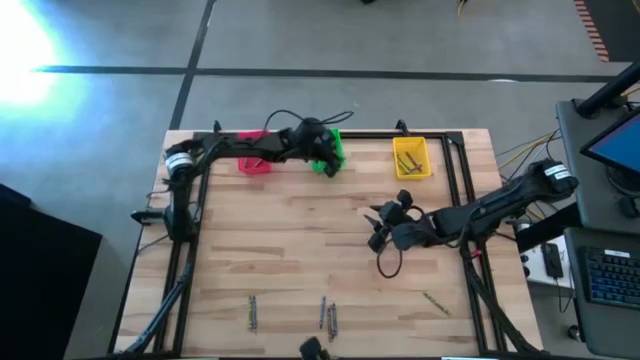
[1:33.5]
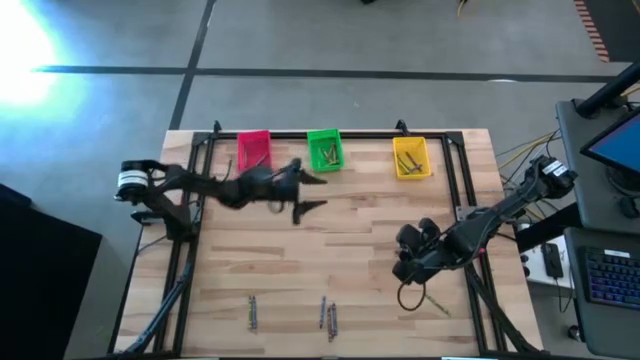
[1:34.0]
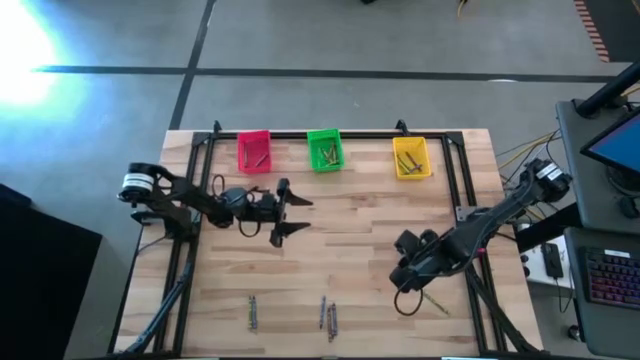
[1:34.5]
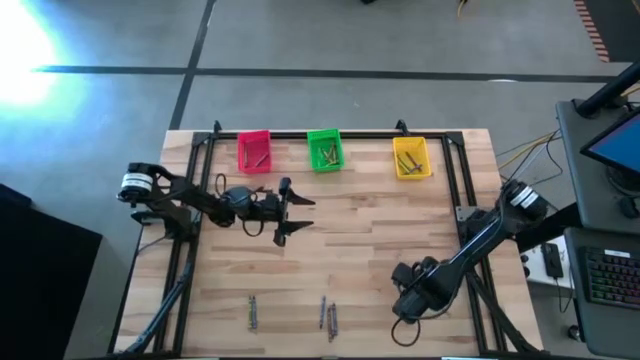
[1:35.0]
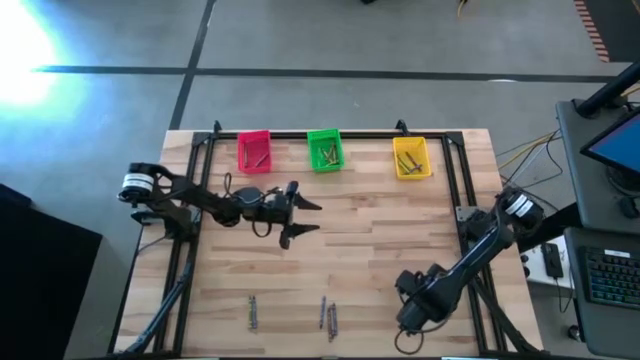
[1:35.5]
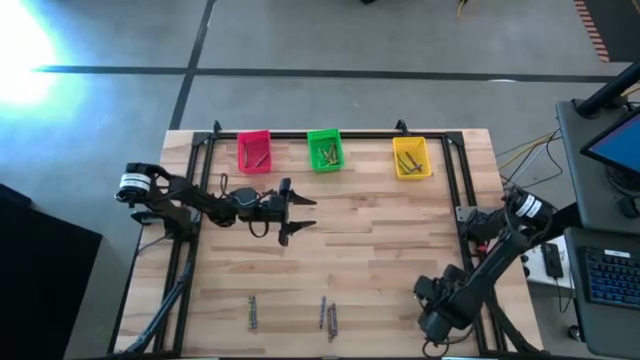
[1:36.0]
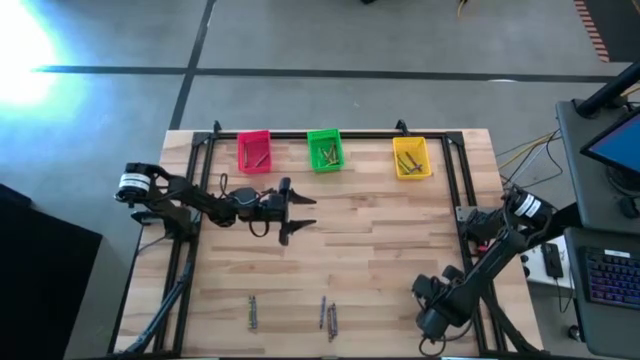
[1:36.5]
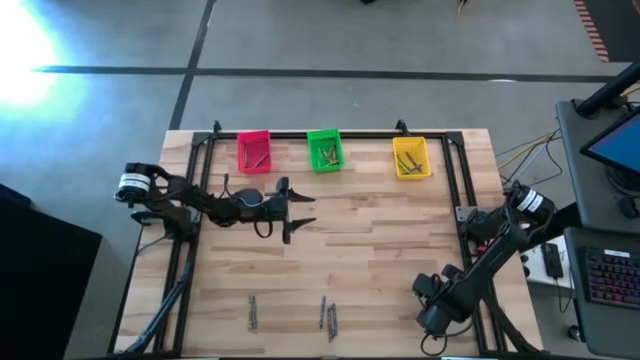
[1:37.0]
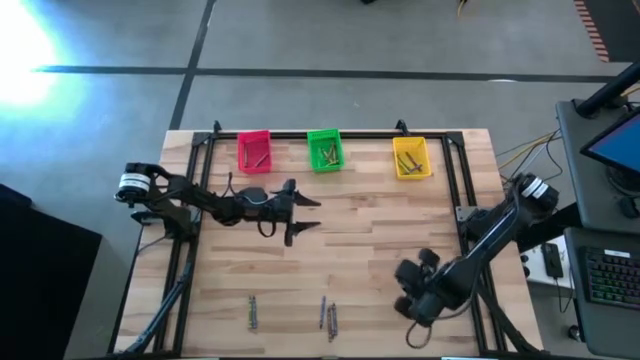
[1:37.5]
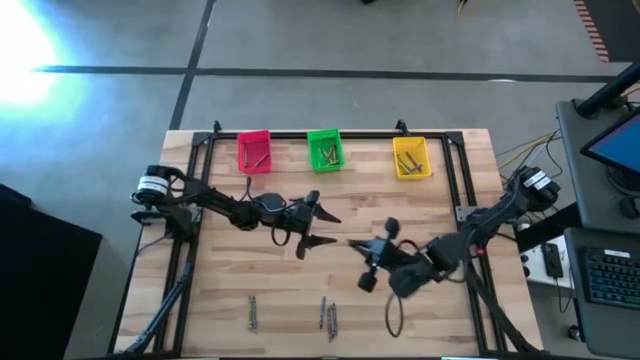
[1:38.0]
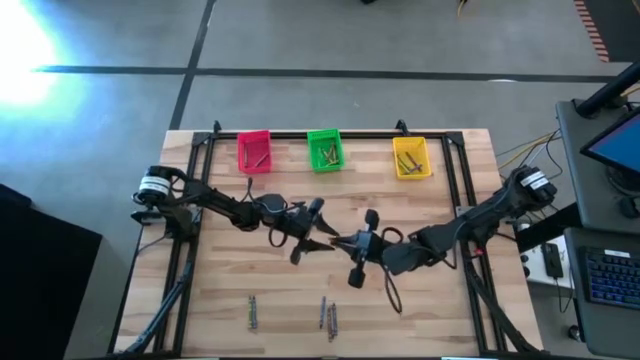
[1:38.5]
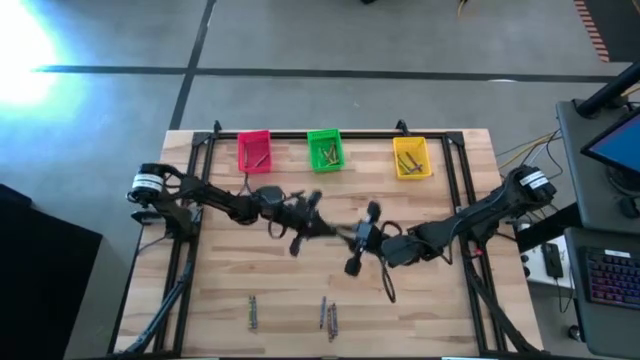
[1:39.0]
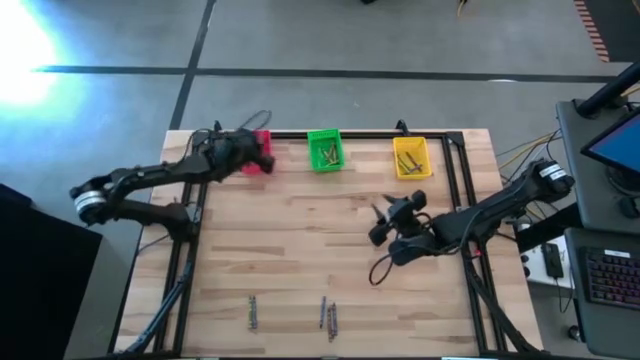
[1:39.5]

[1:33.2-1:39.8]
Task: Sort crayons
Put the green crayon into the red basket

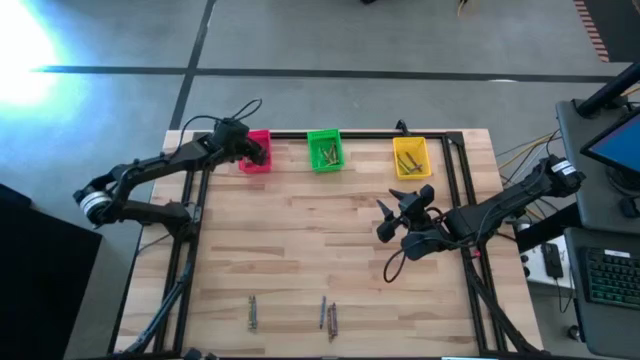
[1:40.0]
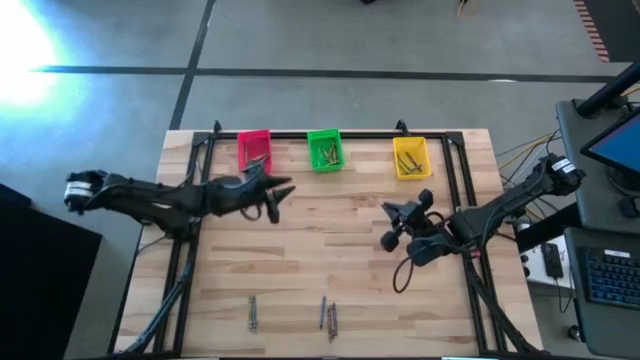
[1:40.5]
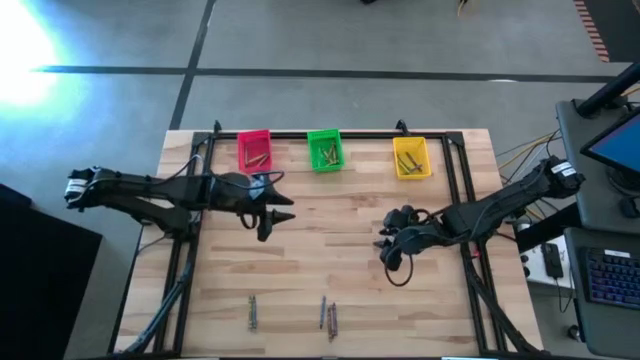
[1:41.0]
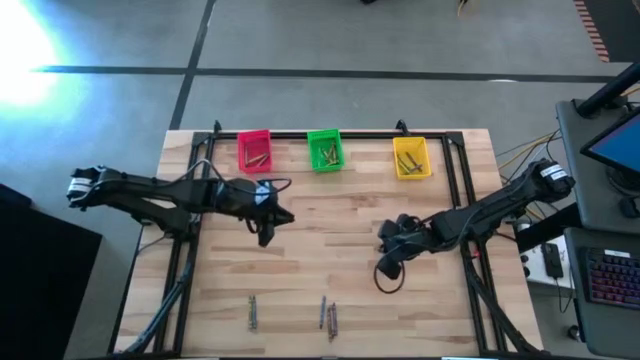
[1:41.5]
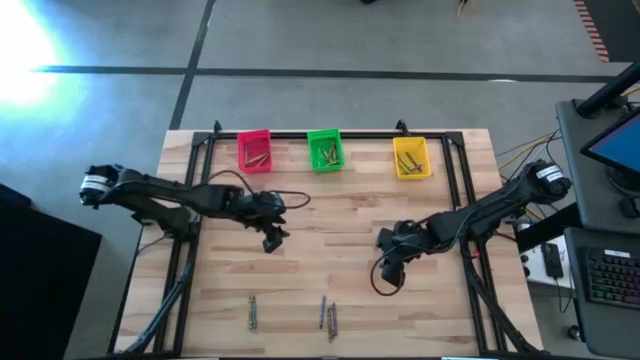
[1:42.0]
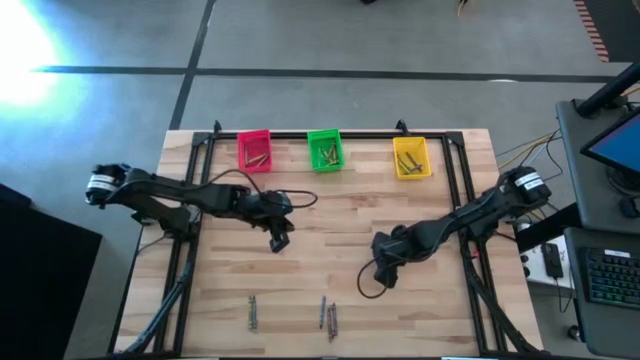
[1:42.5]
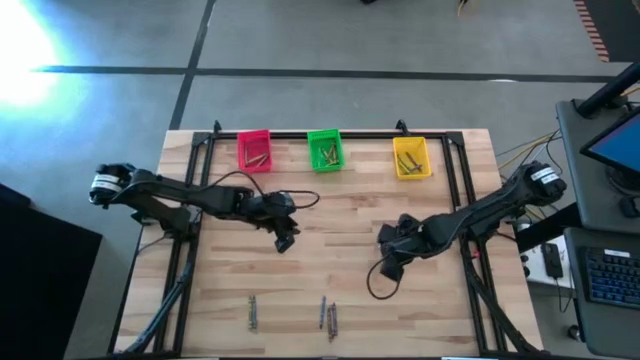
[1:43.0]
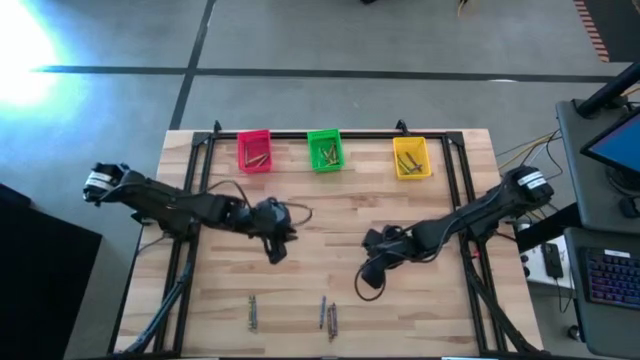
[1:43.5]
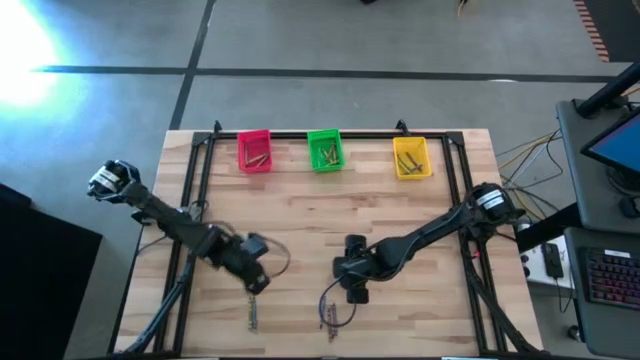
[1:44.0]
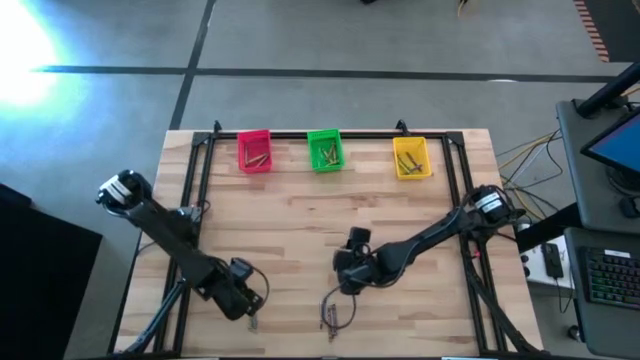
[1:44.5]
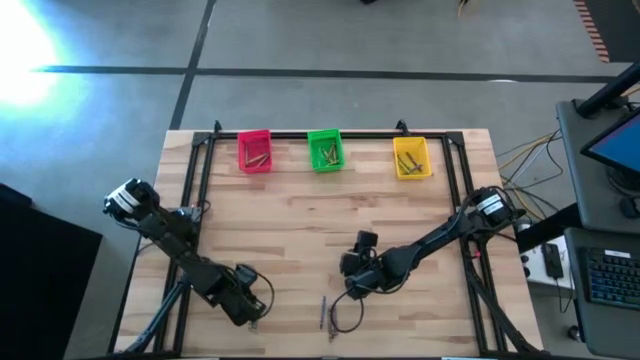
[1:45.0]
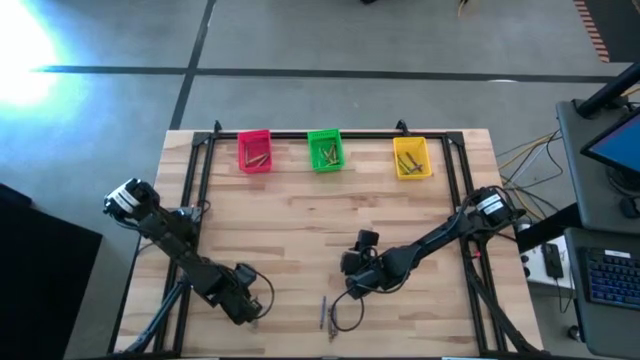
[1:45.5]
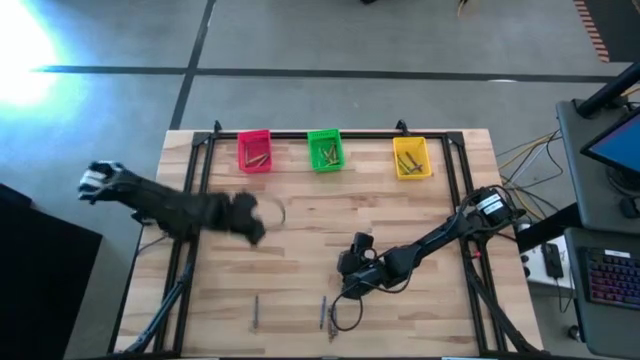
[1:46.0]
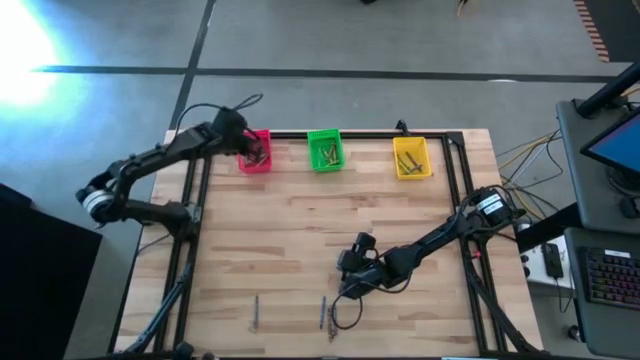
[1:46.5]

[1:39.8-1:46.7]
Put the green crayon into the red basket

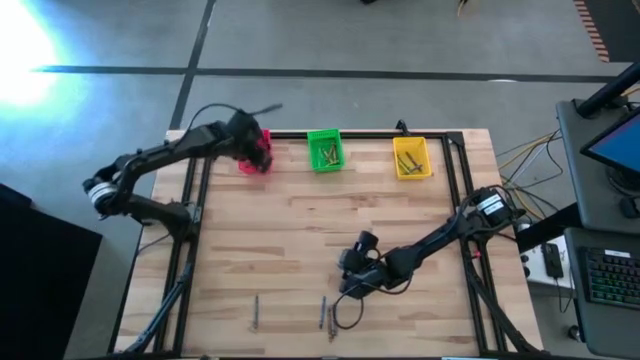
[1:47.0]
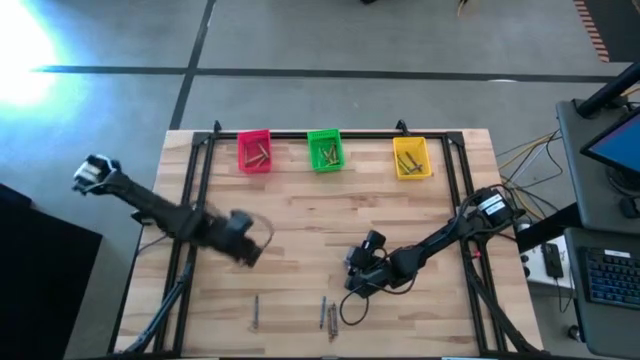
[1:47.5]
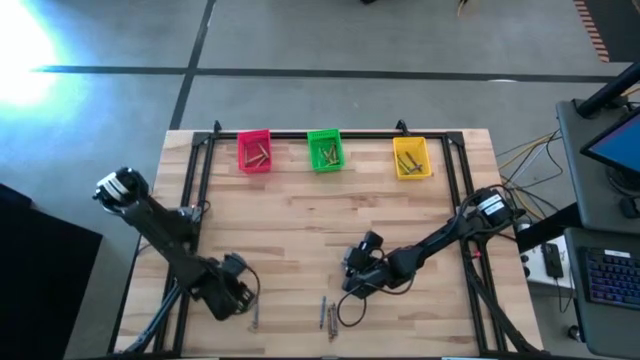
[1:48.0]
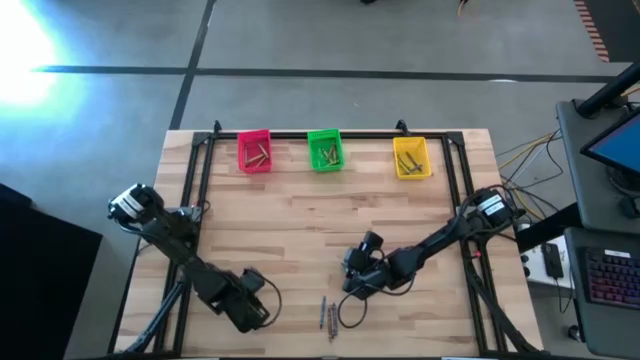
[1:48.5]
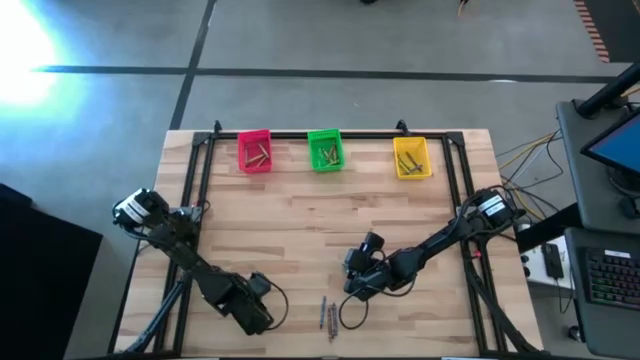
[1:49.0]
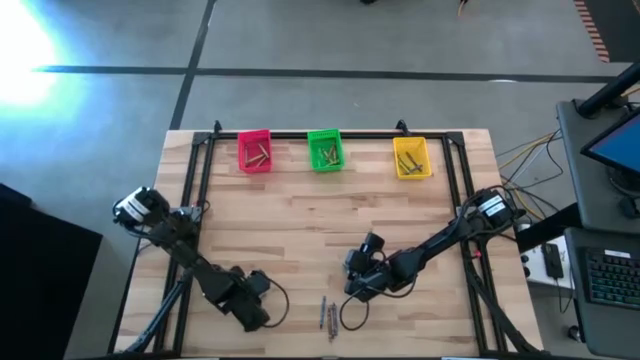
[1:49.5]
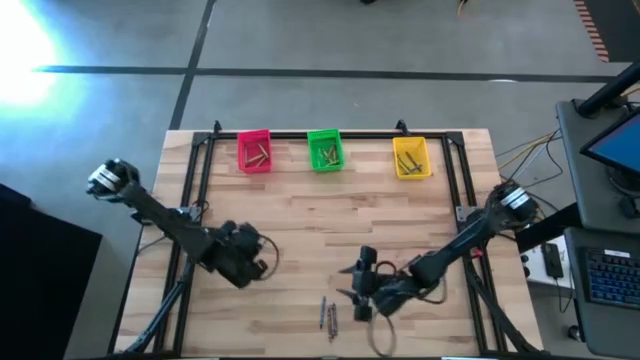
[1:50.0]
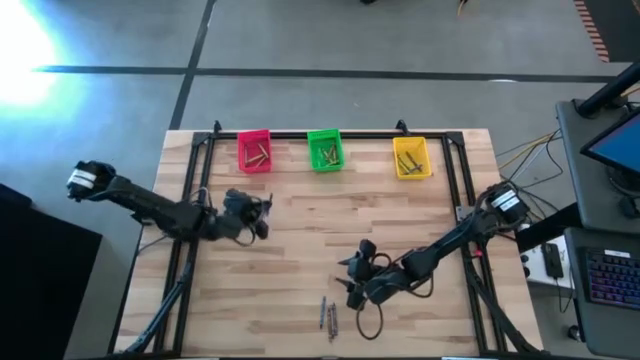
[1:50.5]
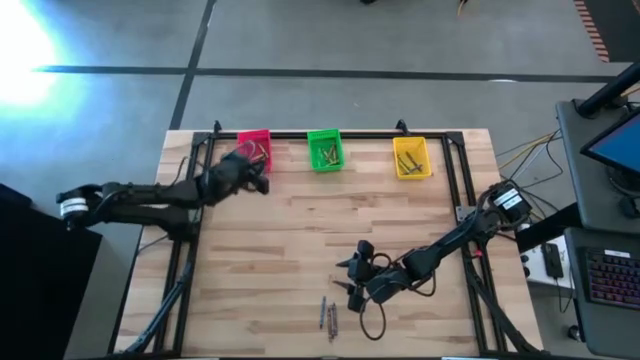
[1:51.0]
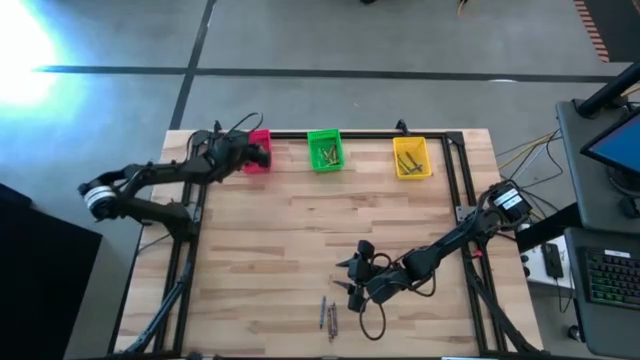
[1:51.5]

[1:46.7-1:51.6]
Put the blue crayon into the red basket

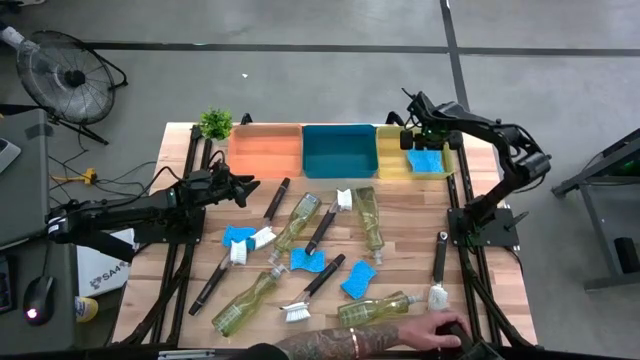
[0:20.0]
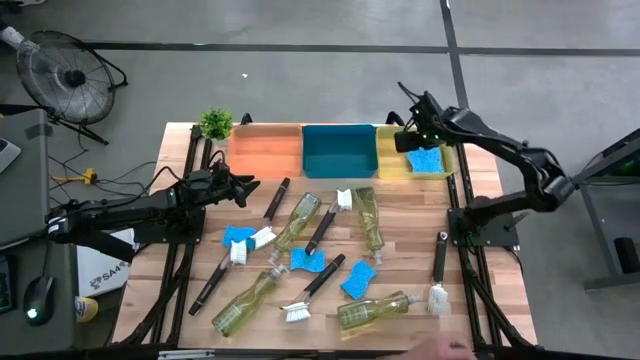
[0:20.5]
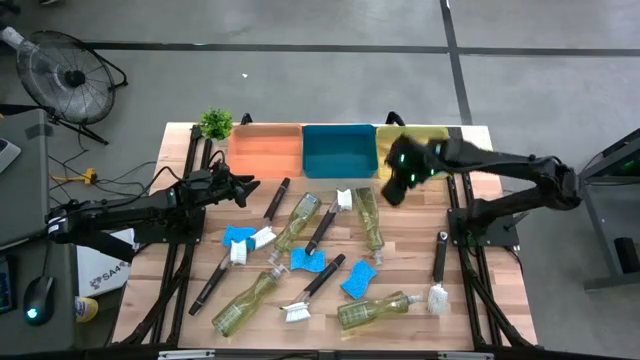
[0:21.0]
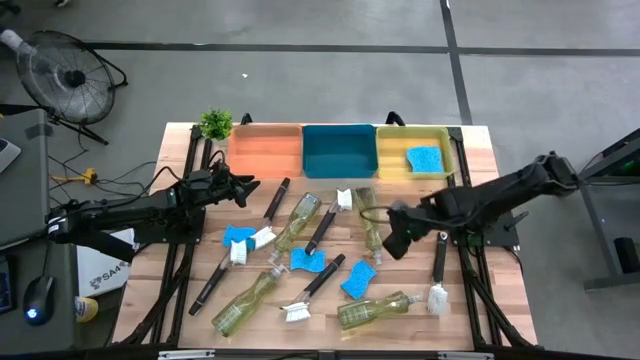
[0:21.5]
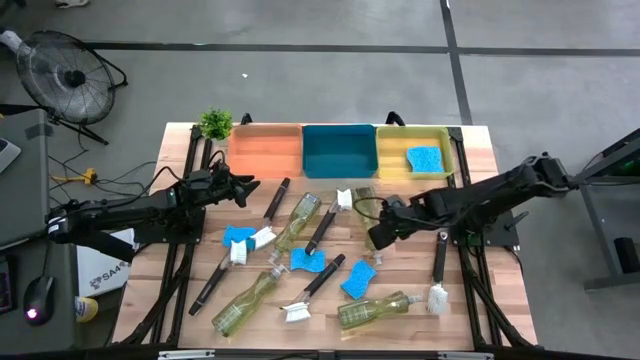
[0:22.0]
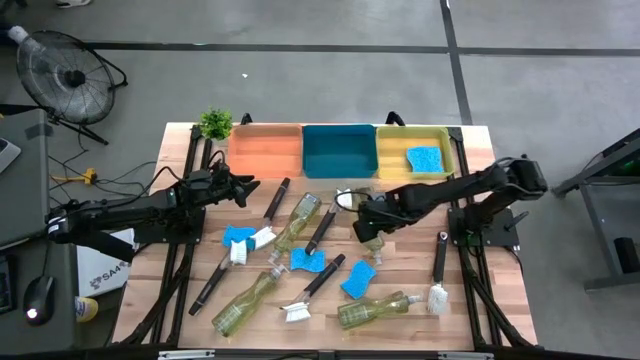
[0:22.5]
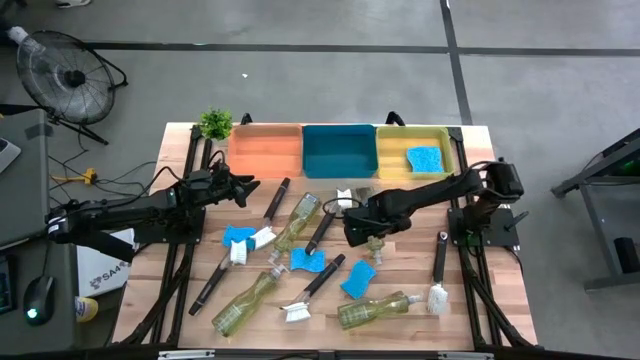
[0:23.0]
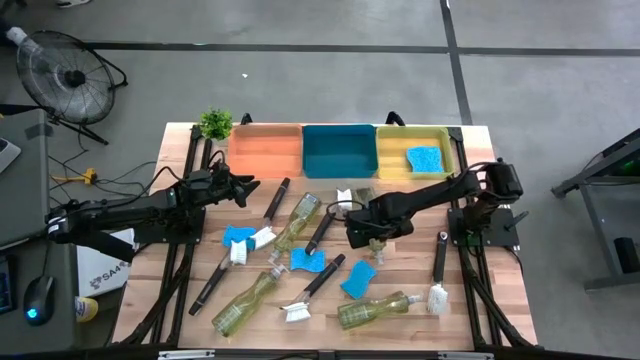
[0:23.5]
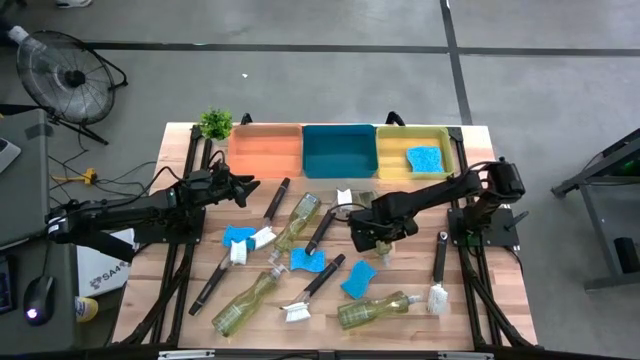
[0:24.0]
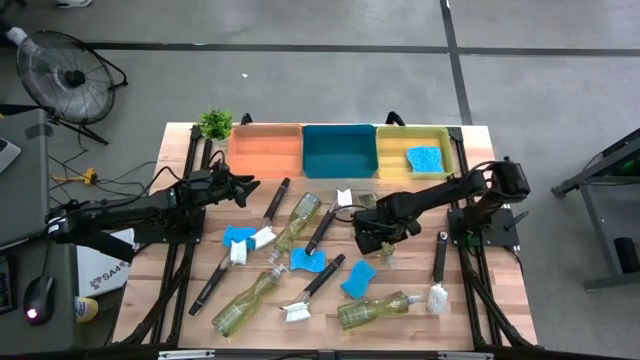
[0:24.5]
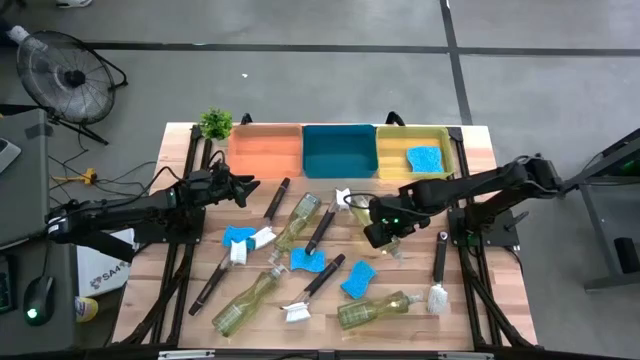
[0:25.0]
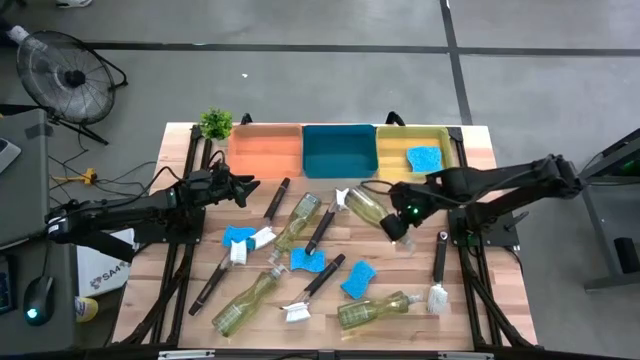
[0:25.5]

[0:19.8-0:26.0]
Task: Pick & Place Kitchen Sink Supplies
Put the green dishwashing liquid bottle into the blue bin
